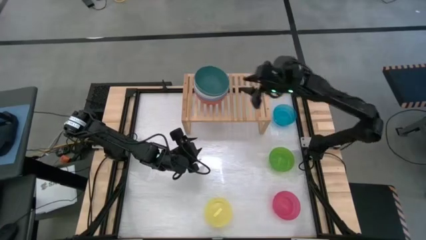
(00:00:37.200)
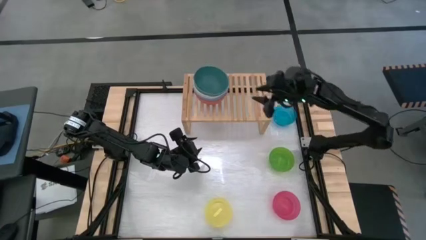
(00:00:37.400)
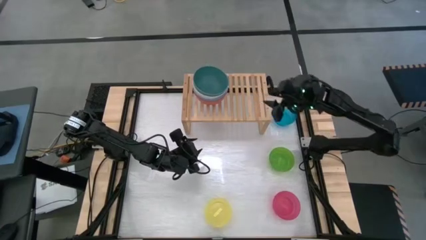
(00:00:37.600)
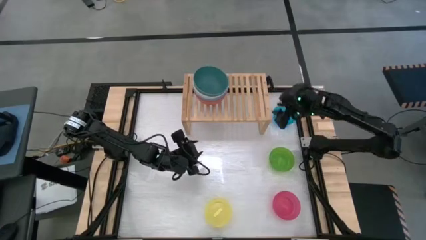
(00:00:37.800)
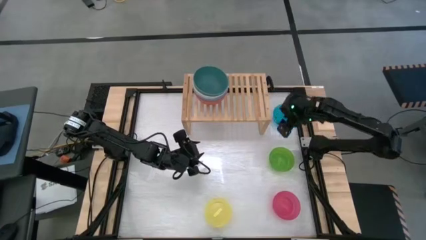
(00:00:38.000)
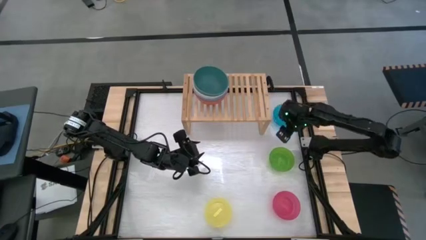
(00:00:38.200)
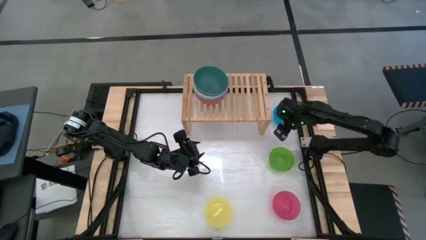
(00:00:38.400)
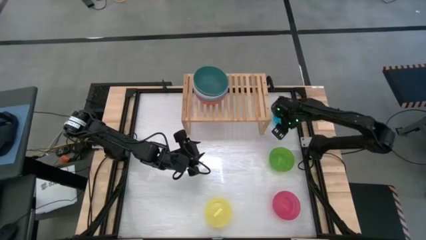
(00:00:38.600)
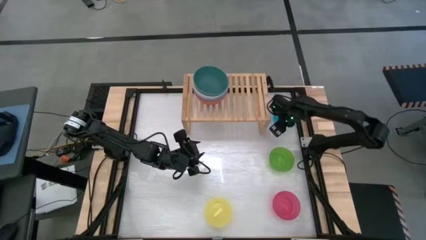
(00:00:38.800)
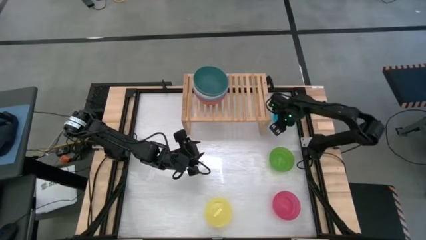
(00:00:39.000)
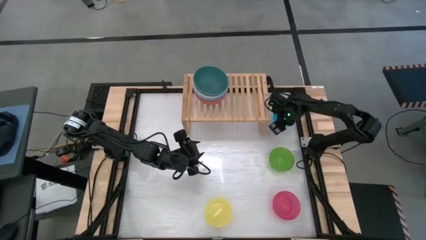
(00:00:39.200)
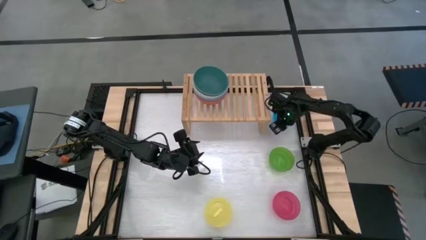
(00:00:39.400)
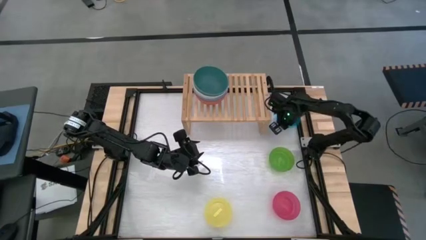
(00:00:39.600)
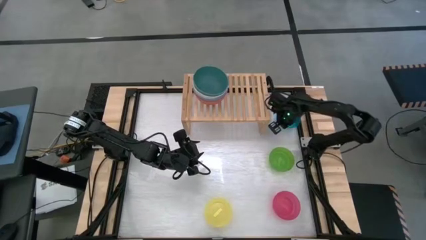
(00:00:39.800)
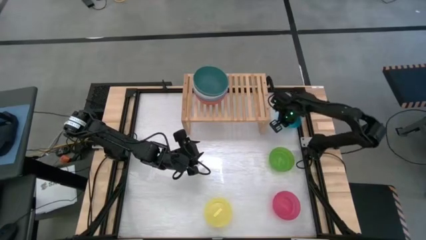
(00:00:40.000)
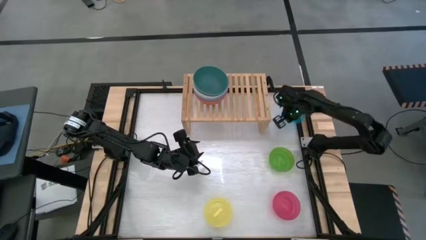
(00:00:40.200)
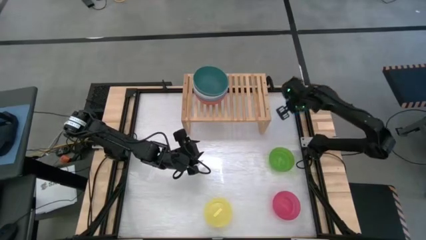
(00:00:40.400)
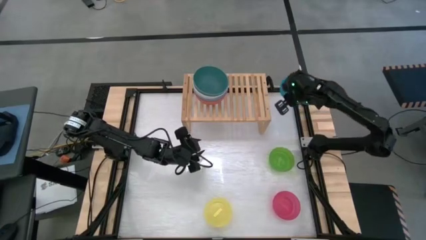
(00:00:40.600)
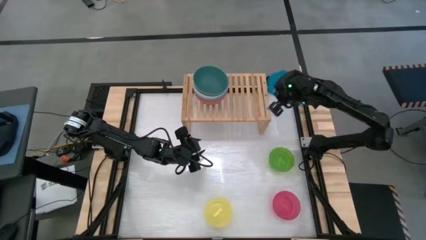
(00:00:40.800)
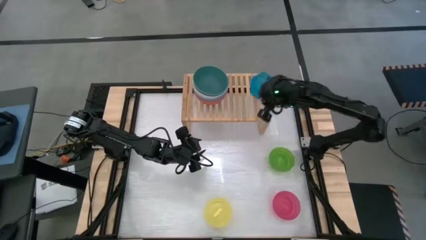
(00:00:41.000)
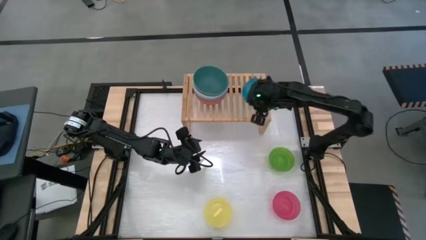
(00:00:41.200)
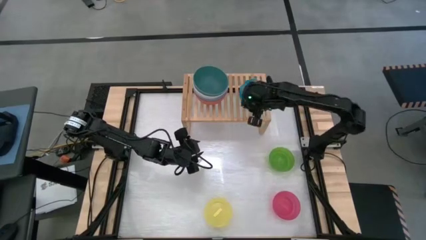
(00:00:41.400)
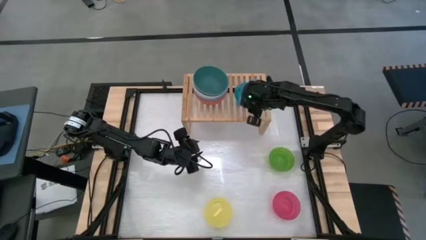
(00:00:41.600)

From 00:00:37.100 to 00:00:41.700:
Task: Place and stack bowls onto a shelf
Put the small blue bowl on the shelf

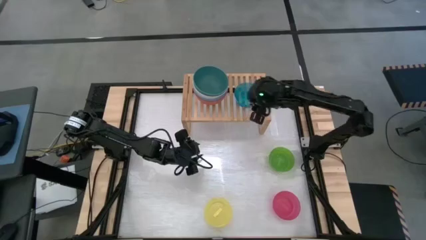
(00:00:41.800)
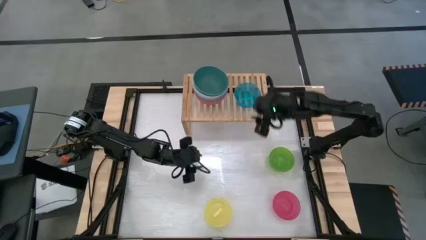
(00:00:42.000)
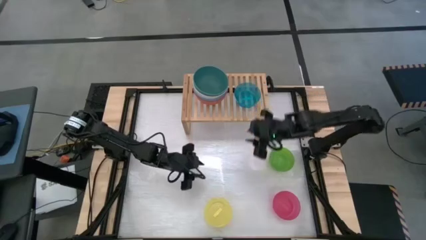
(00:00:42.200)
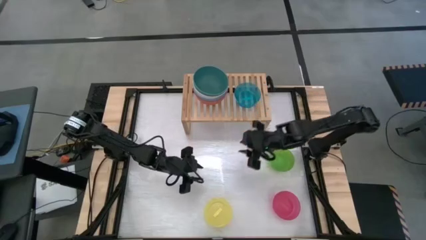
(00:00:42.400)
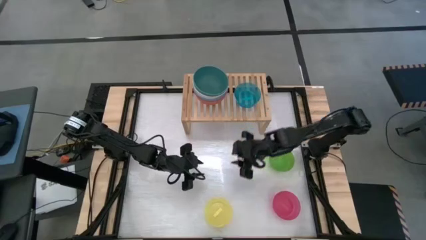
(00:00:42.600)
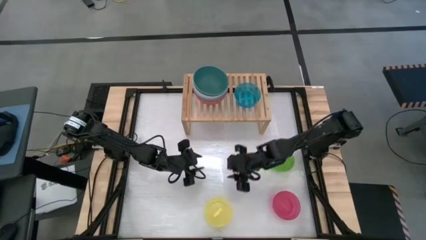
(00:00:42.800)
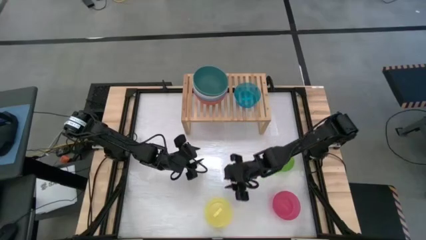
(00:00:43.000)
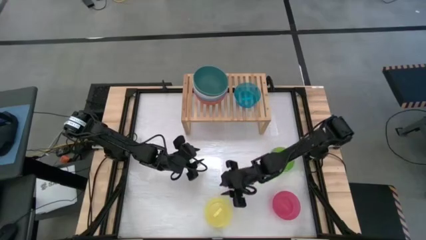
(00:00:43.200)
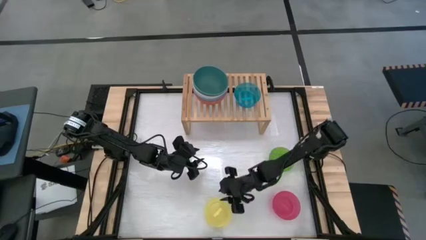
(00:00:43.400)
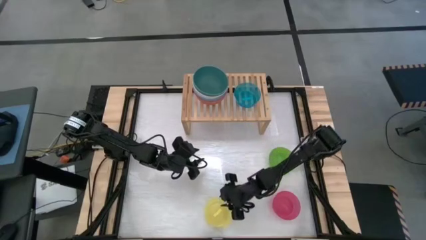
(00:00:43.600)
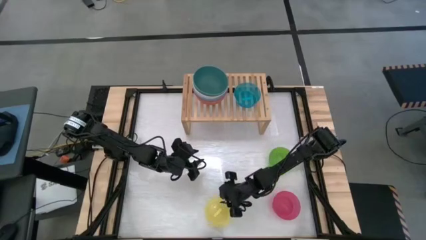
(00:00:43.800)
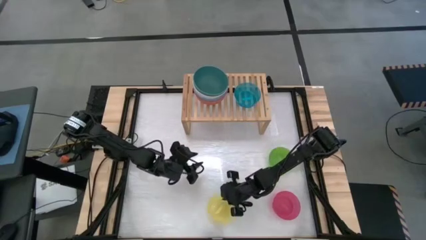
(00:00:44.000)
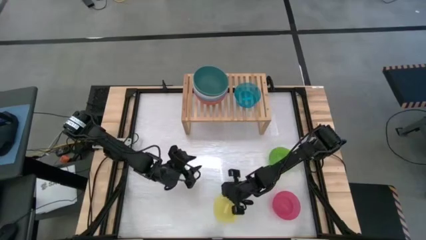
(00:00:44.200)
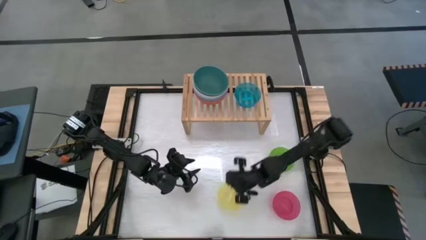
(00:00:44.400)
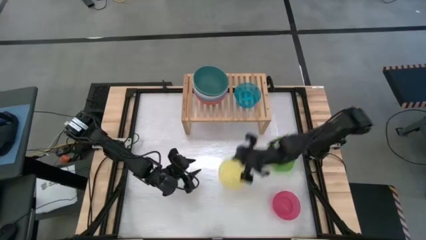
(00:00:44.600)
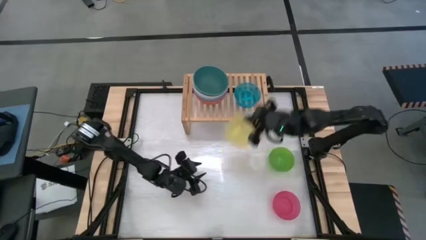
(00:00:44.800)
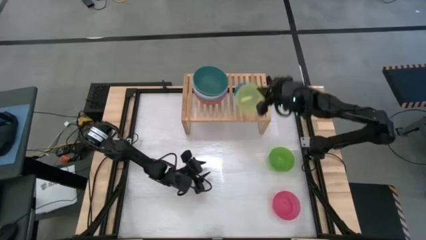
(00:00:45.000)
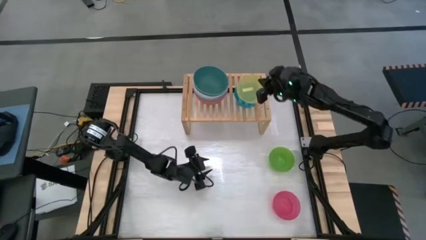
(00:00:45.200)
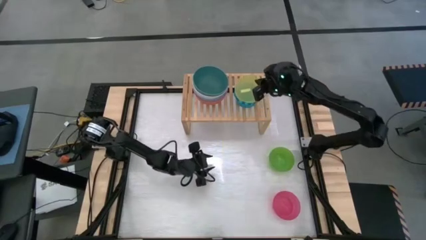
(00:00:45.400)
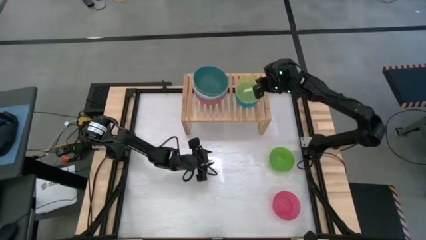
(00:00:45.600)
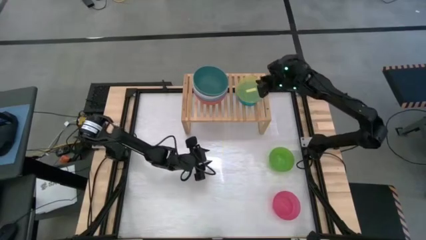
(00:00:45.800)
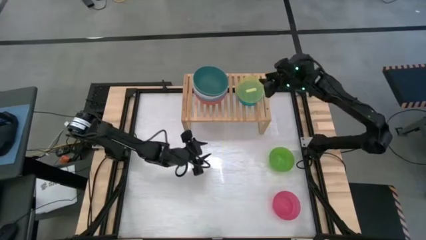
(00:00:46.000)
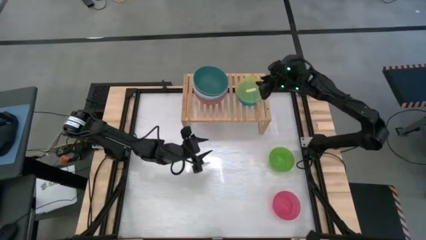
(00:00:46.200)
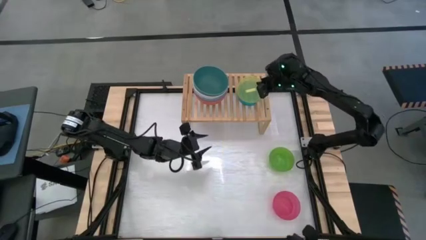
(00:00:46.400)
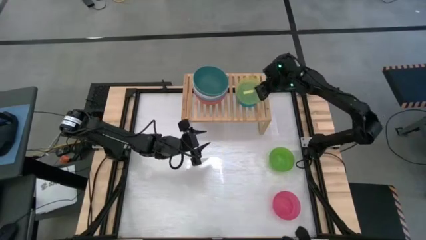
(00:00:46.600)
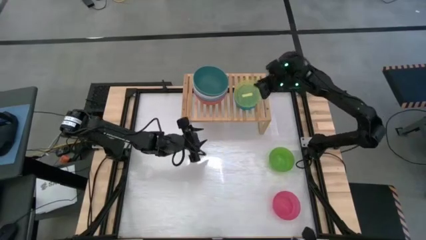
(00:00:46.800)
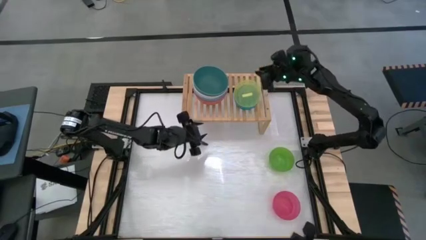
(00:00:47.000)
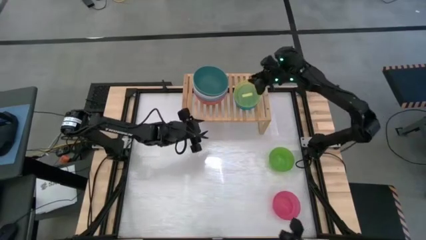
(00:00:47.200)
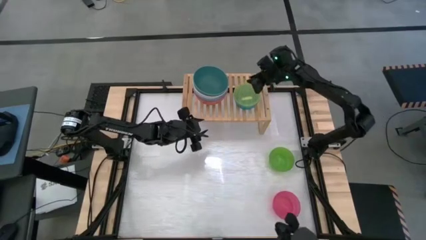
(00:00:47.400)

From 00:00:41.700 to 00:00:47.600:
Stack the small yellow bowl on top of the small blue bowl on the shelf

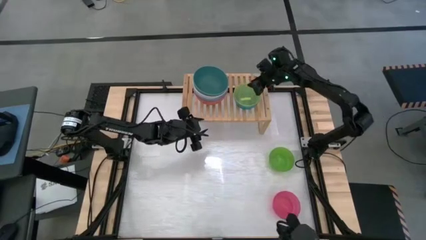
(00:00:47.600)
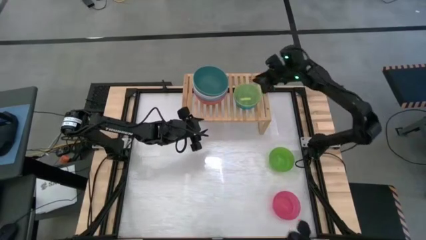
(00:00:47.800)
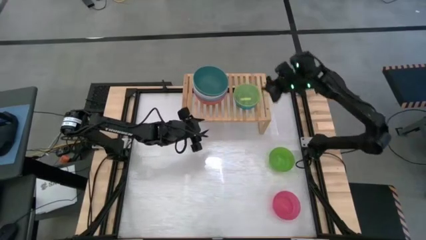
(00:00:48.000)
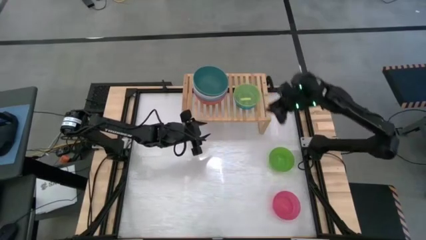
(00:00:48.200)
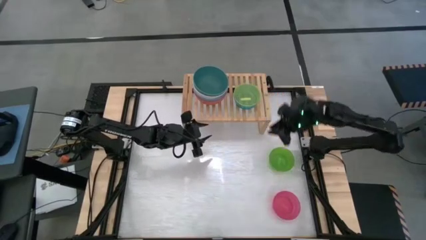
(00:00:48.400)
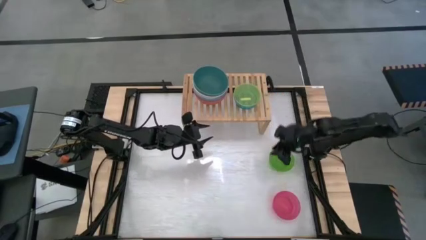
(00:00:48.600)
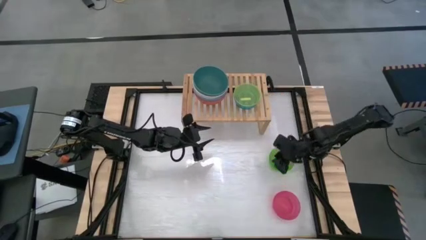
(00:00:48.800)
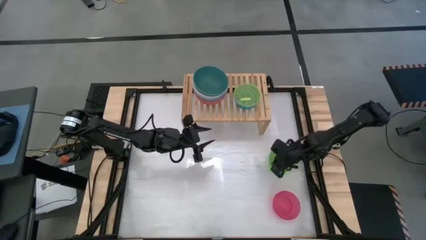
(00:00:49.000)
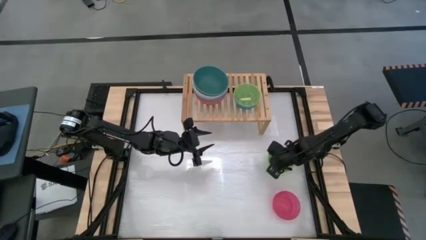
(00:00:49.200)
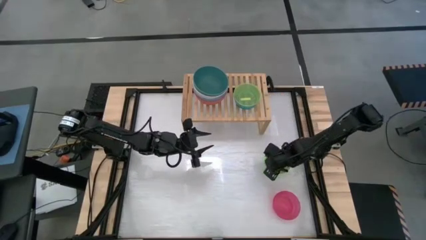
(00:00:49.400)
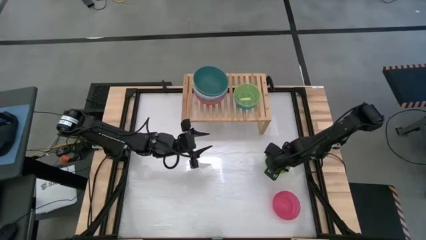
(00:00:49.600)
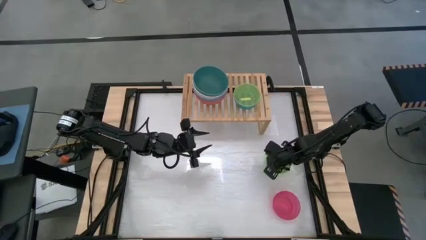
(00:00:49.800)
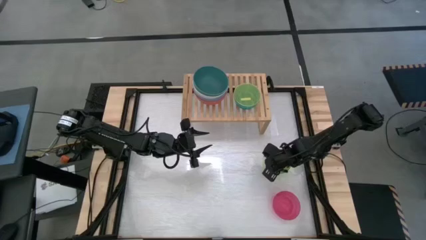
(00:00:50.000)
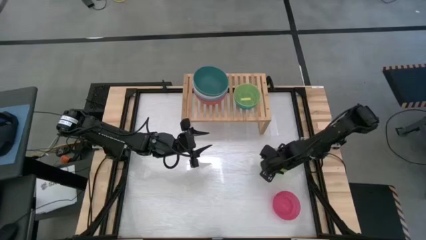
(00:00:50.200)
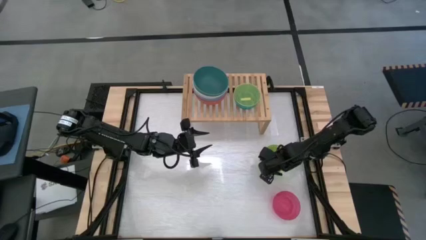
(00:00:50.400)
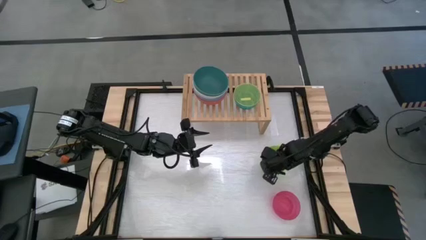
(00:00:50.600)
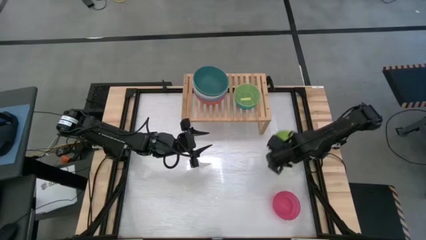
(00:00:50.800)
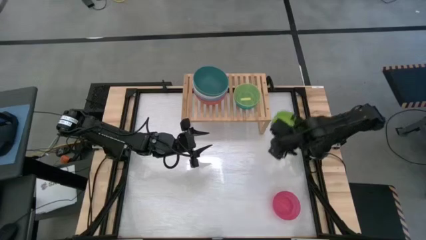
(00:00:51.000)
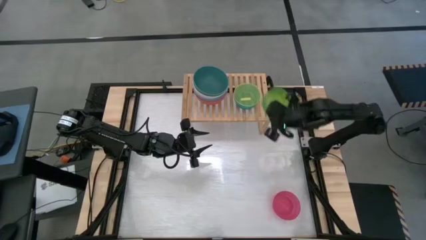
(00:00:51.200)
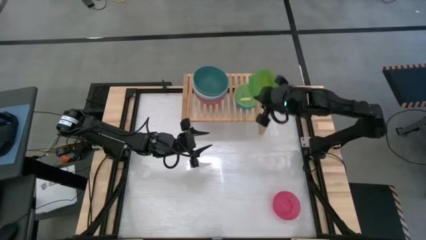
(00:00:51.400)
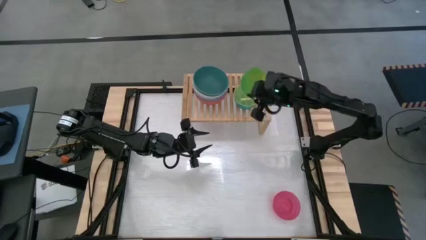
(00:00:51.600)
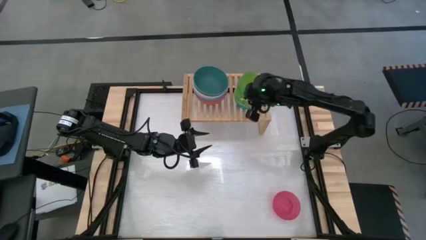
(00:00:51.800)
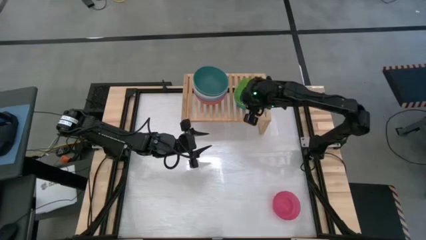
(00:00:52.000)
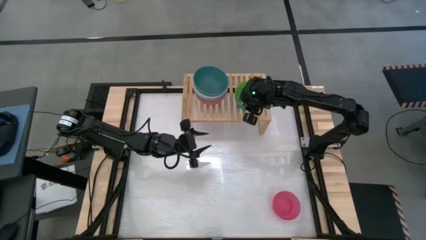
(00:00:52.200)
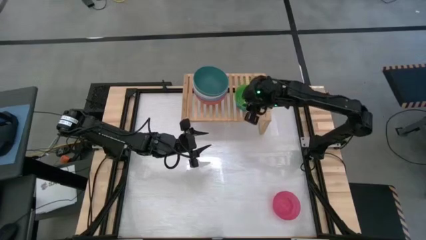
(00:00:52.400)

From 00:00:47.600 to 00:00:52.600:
Stack the small green bowl on top of the small yellow bowl on the shelf
